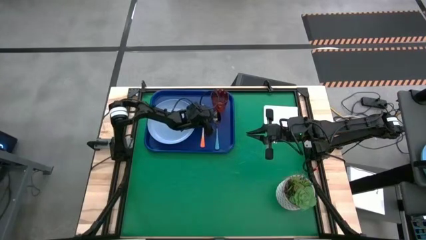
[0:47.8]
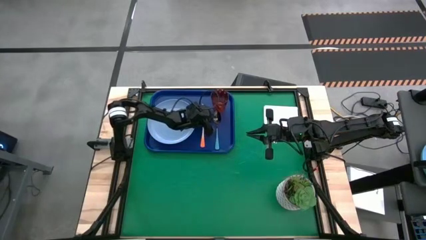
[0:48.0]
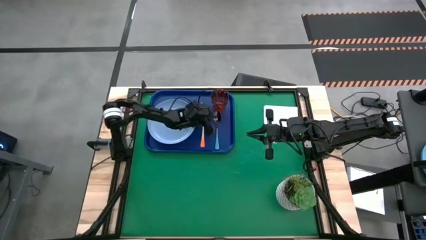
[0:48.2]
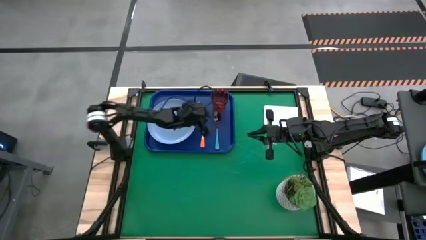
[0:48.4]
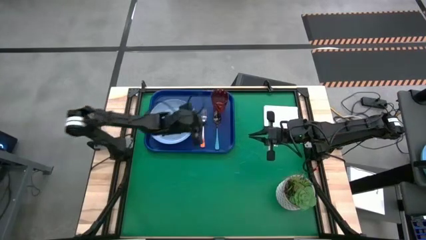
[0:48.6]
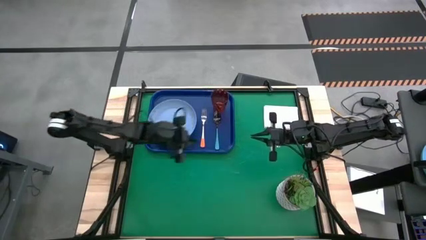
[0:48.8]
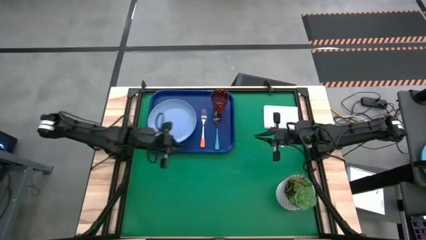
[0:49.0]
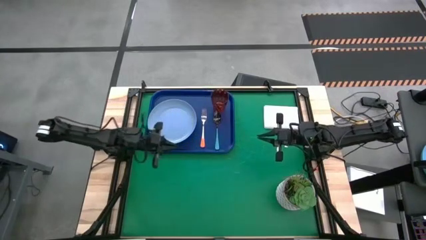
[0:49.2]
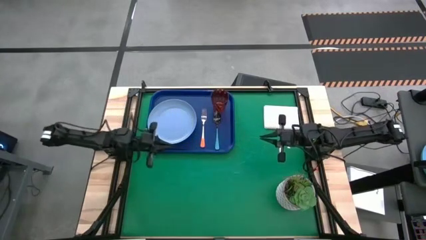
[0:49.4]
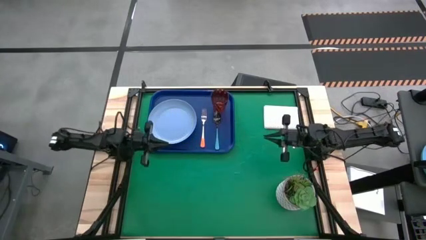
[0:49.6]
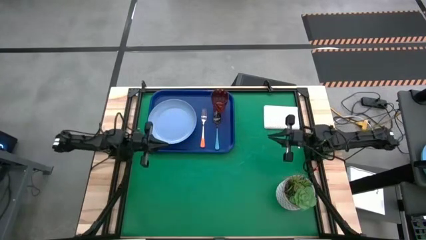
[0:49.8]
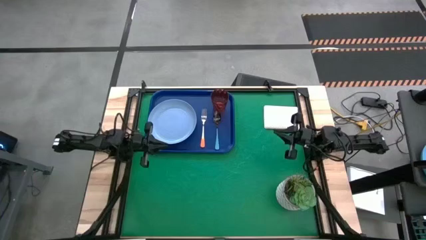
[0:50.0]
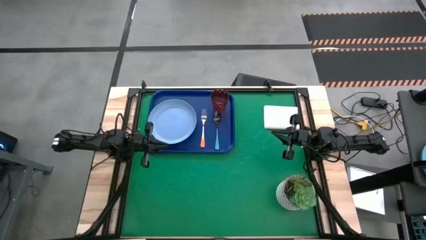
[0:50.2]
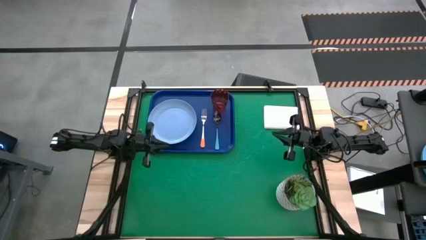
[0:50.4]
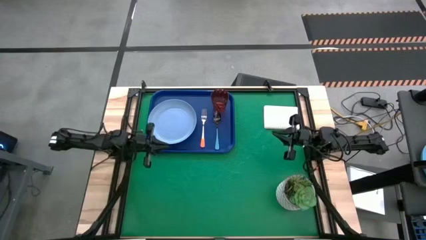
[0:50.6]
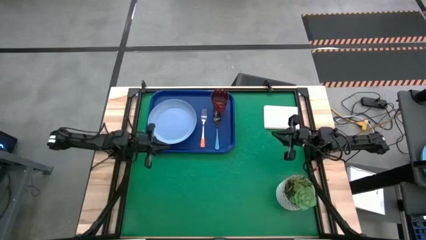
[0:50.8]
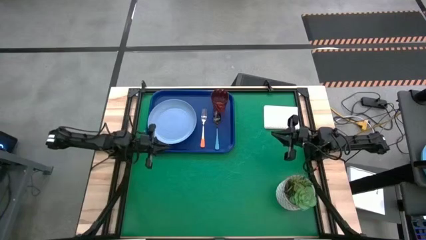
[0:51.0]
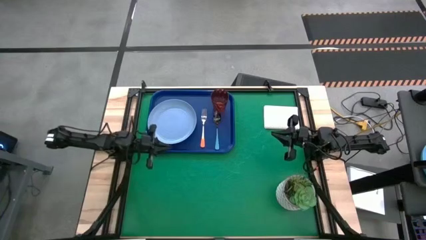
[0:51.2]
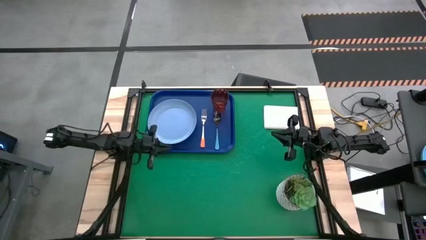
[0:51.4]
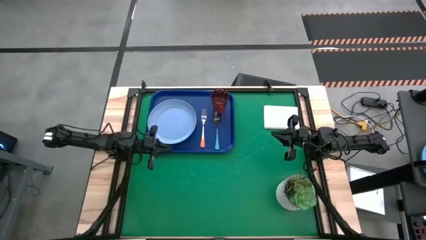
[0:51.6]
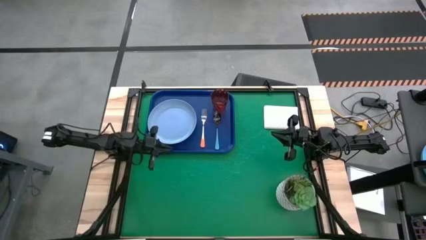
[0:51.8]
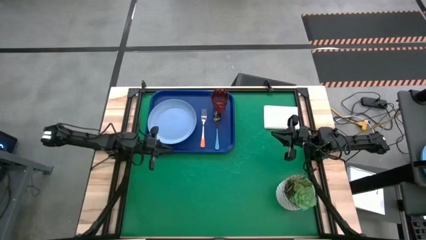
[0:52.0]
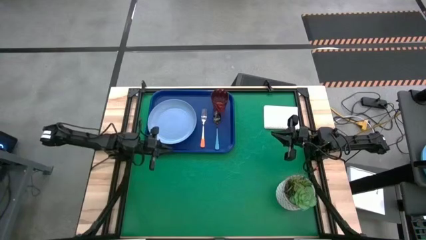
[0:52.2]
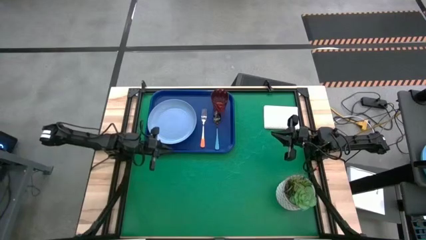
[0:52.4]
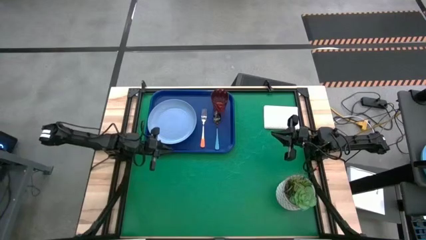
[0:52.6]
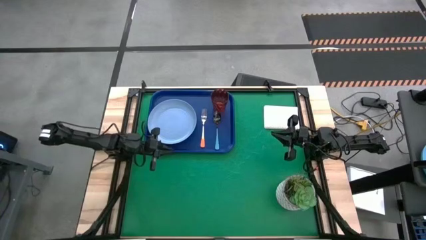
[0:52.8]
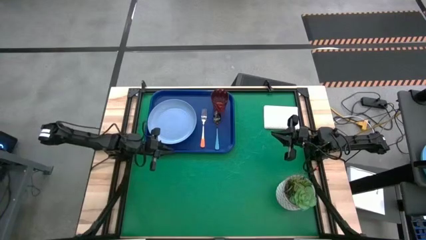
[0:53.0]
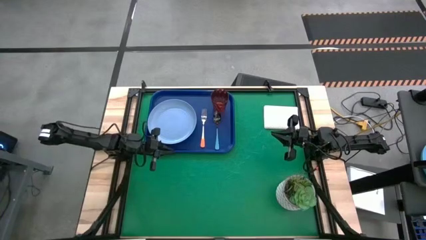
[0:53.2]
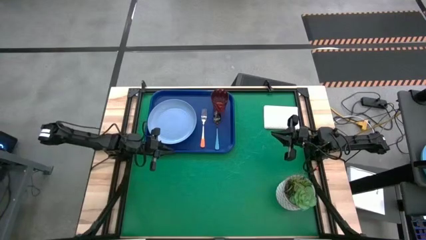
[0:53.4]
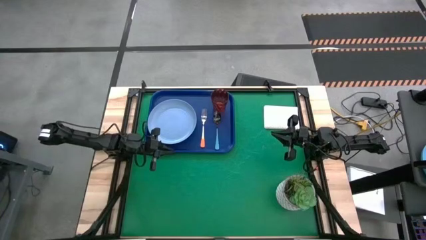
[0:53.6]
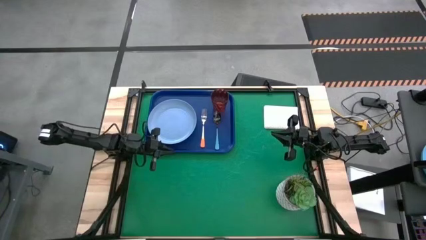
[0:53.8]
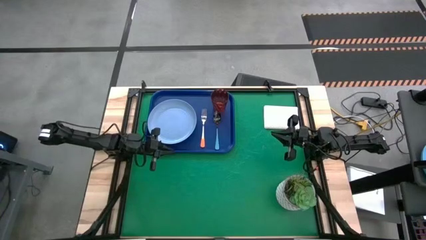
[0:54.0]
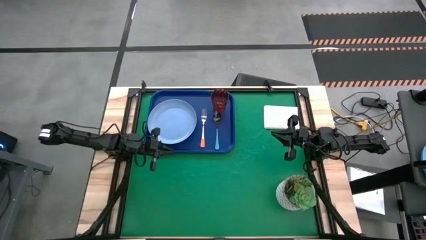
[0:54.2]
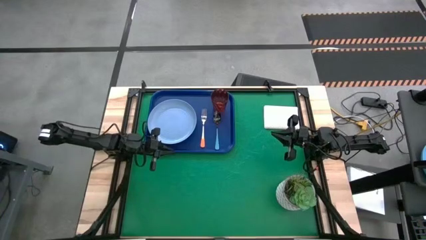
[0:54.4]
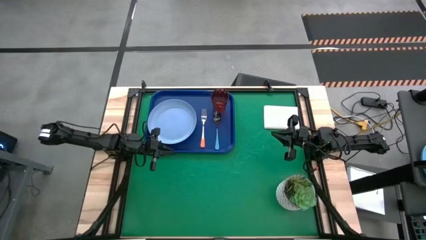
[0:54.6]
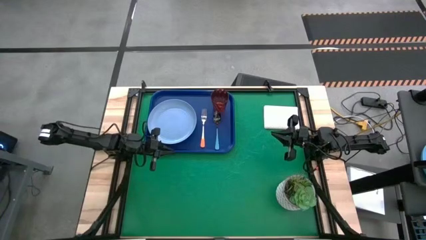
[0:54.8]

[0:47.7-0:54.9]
Task: Pick and place plate/cup/fork/spoon on tray
Return to Home Position

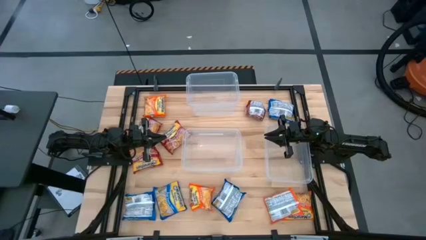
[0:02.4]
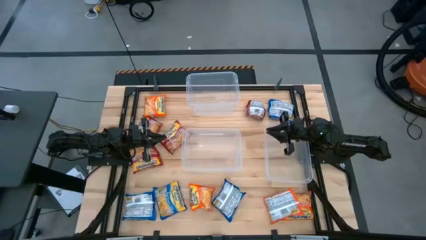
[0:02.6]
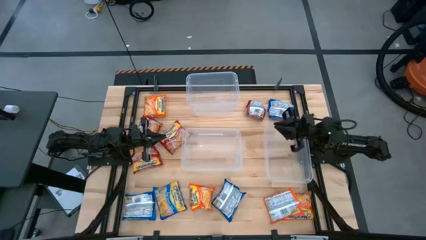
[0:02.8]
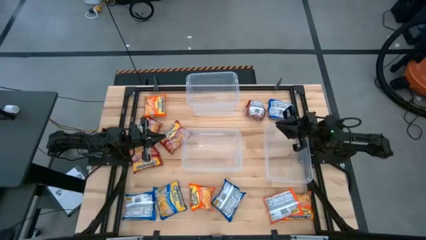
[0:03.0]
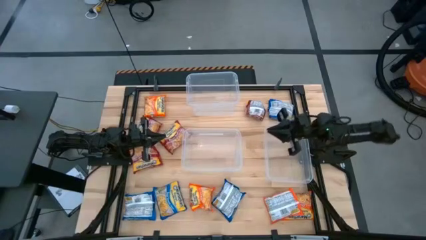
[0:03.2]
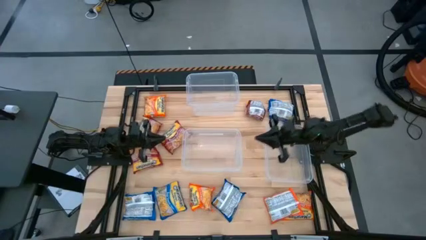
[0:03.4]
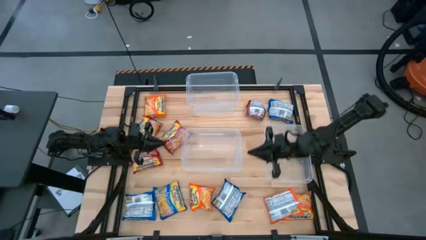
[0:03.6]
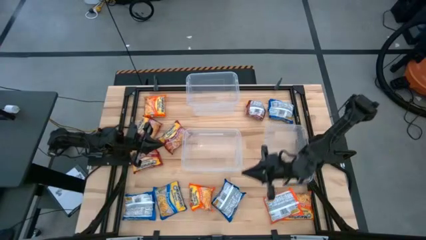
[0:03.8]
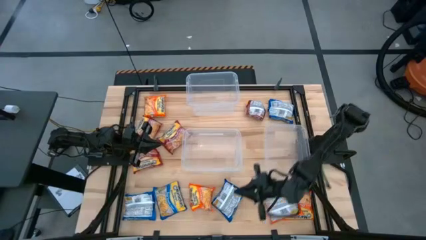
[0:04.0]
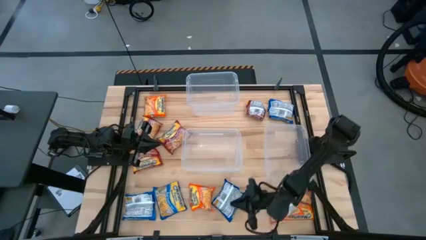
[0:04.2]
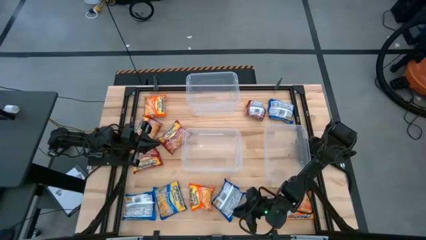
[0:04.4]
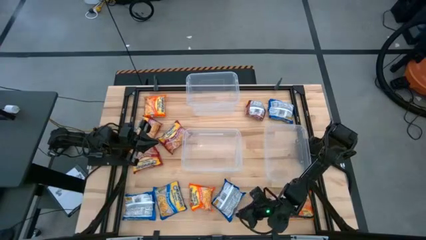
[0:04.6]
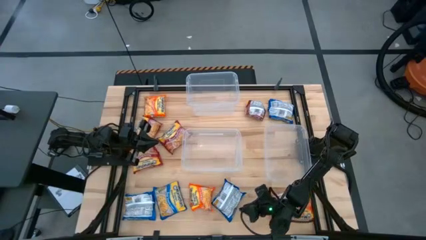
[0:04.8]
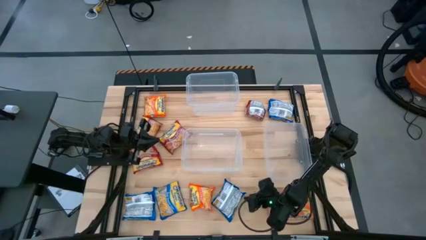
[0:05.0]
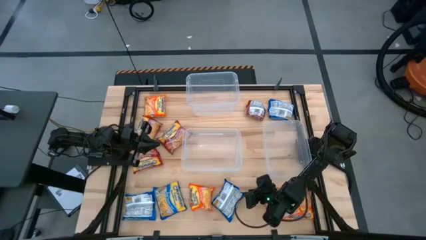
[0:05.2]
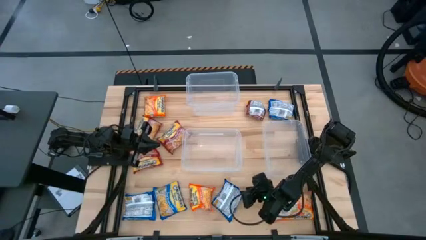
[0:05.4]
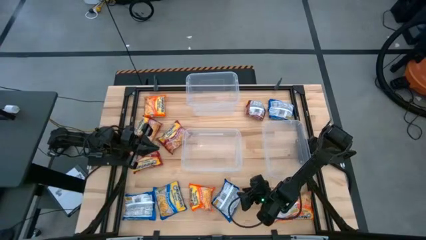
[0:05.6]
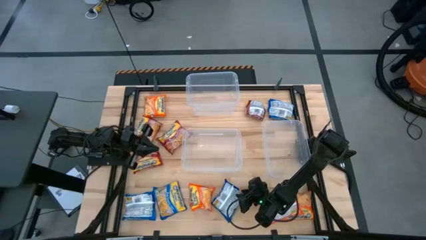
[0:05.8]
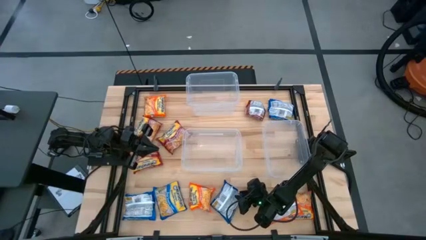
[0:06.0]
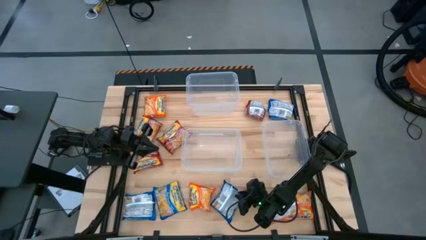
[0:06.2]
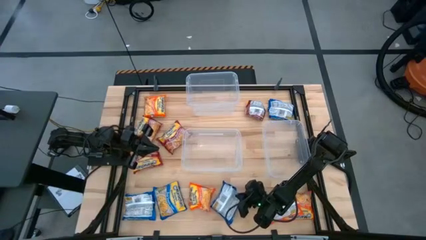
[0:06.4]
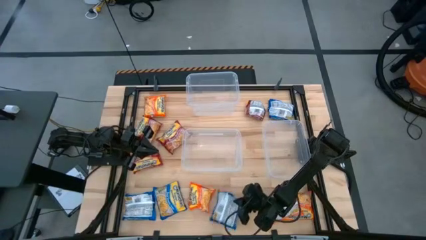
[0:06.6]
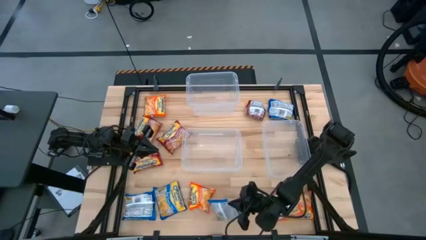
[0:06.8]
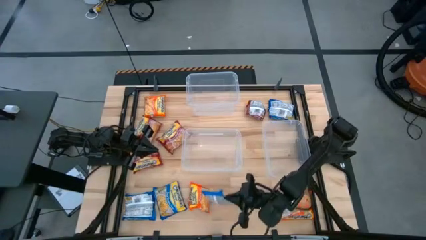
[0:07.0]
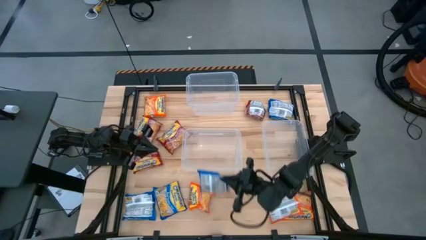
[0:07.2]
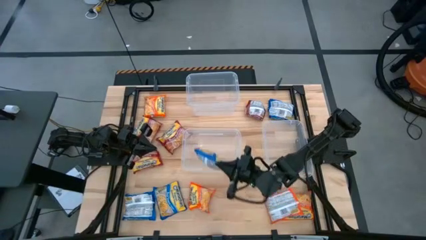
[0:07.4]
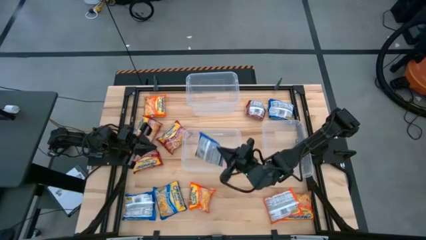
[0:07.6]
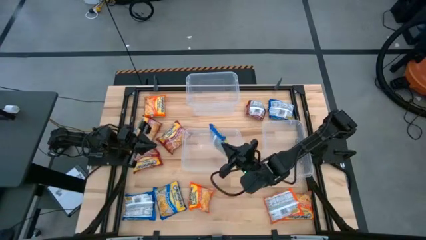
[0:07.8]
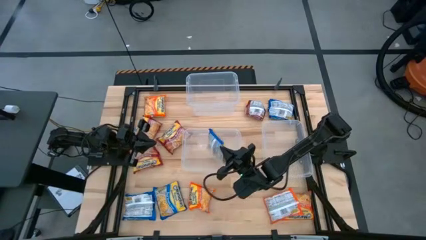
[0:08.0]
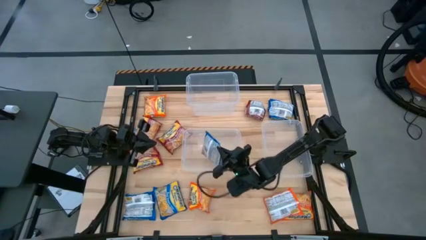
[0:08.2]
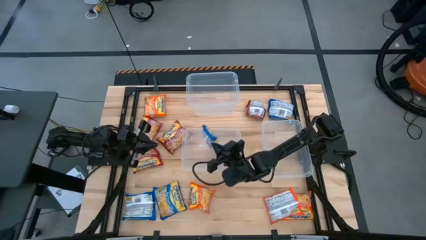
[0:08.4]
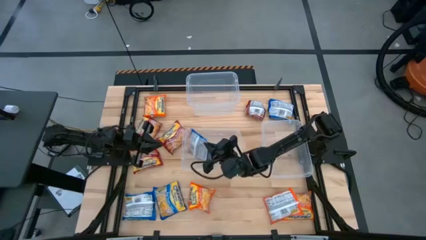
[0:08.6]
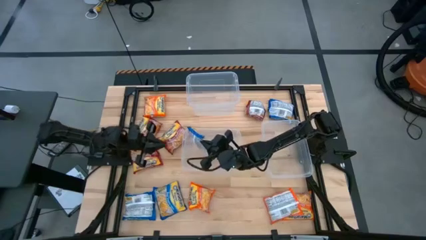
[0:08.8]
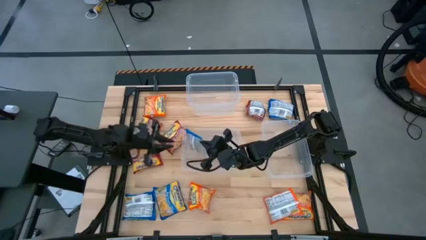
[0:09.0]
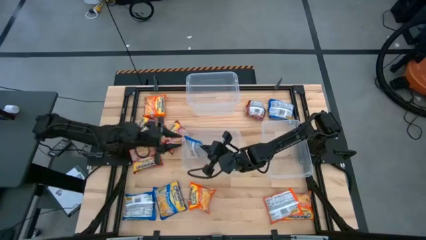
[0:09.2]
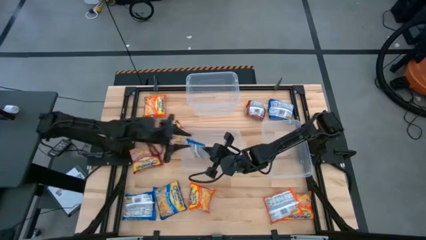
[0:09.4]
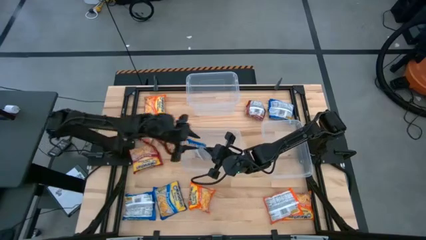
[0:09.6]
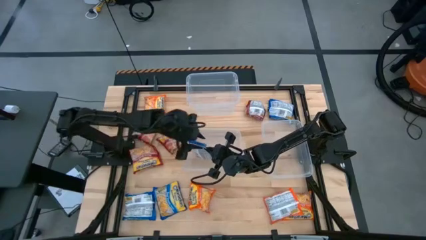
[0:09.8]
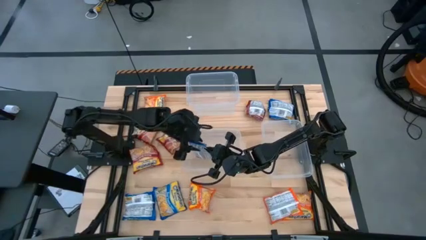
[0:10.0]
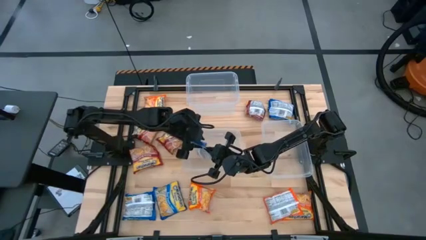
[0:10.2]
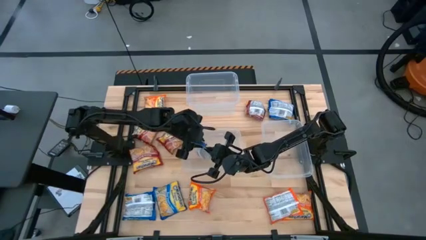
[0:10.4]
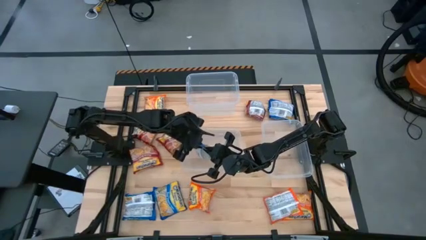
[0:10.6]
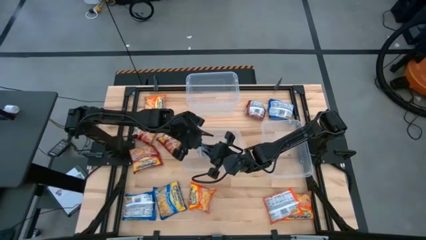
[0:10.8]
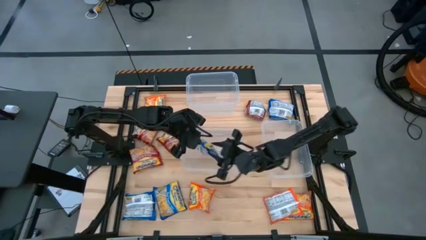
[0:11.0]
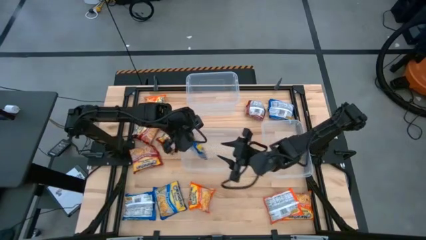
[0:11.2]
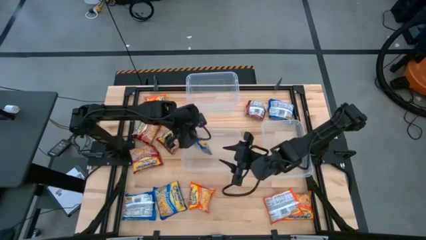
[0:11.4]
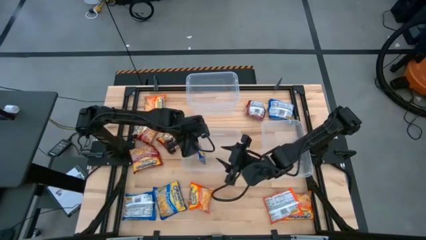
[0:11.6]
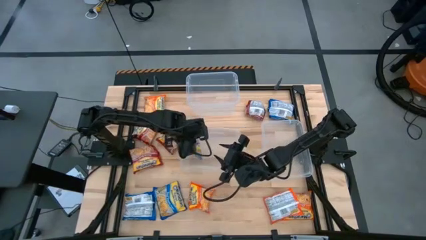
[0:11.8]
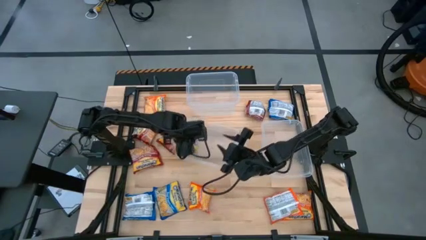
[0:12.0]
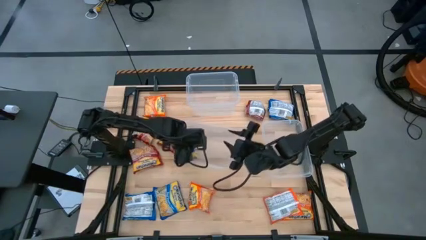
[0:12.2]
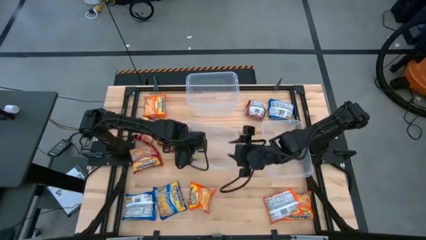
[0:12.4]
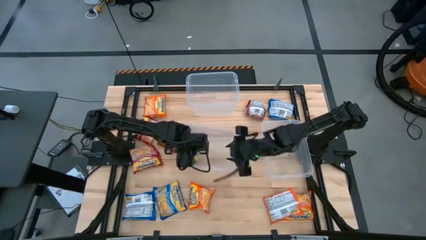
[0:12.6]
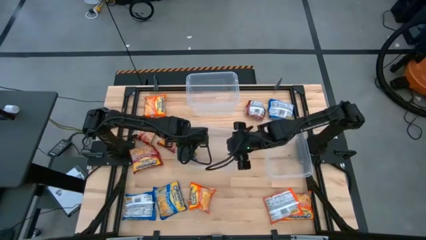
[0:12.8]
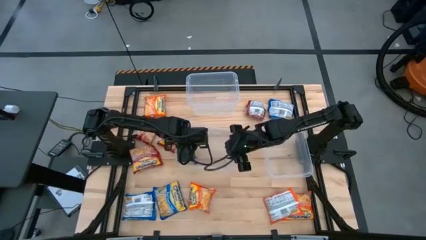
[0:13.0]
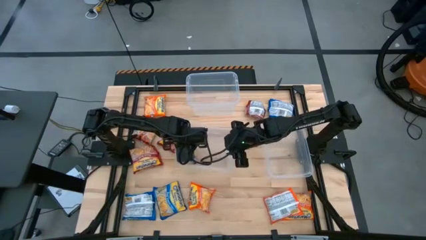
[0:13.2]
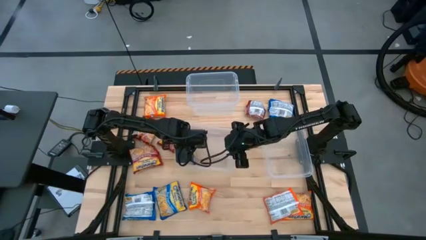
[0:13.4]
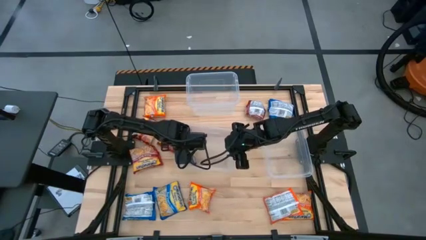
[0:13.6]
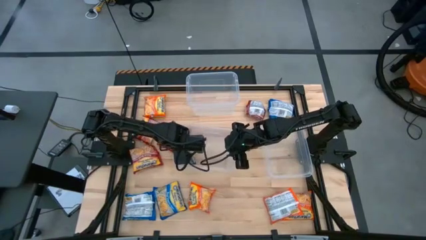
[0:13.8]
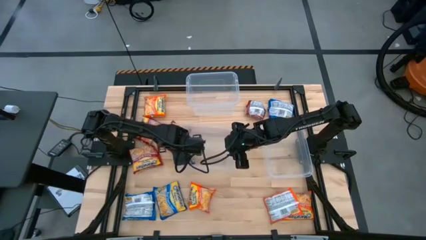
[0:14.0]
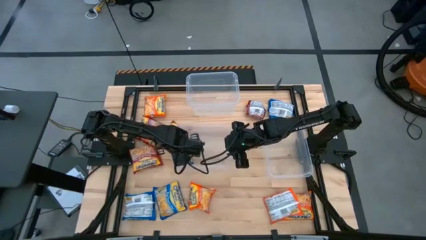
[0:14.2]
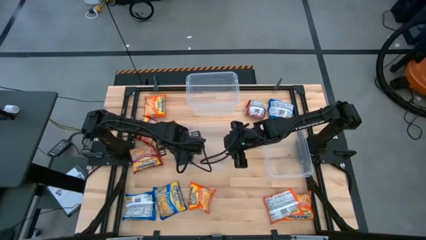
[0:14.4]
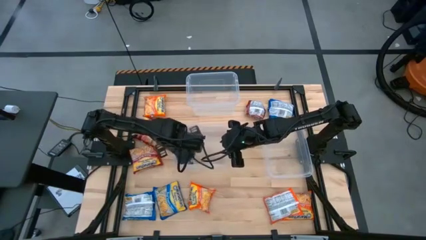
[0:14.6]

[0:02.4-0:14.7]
Task: Sort Maruchan noodles
Put the blue noodle pack into the bottom left transparent bin
